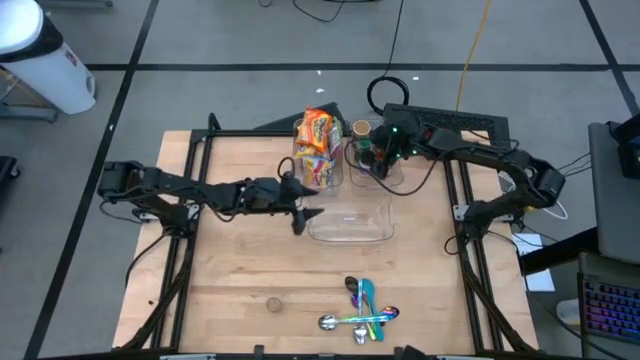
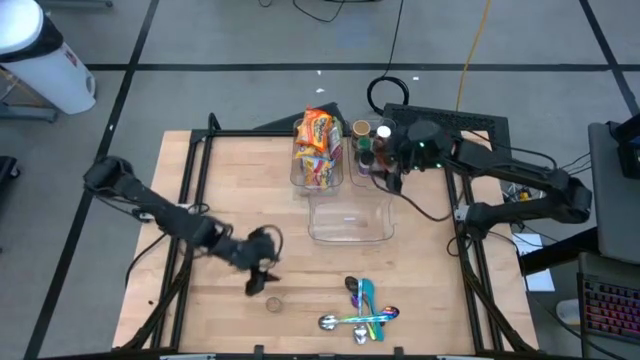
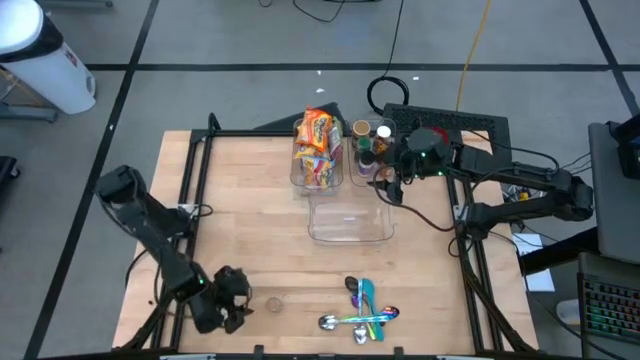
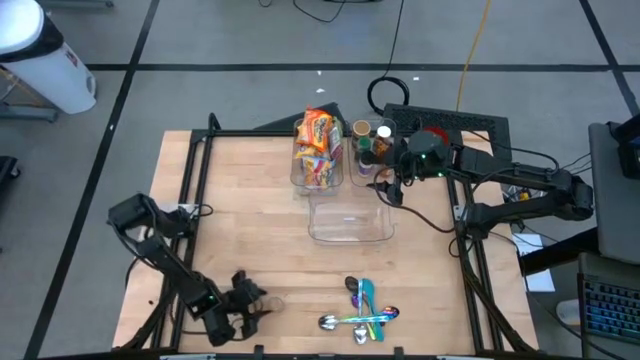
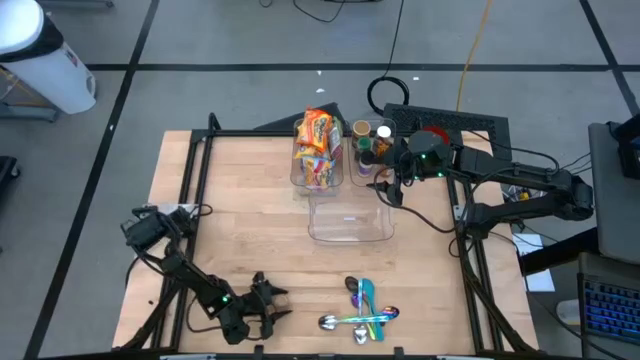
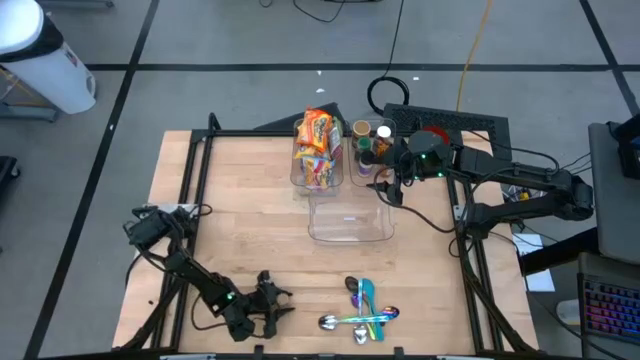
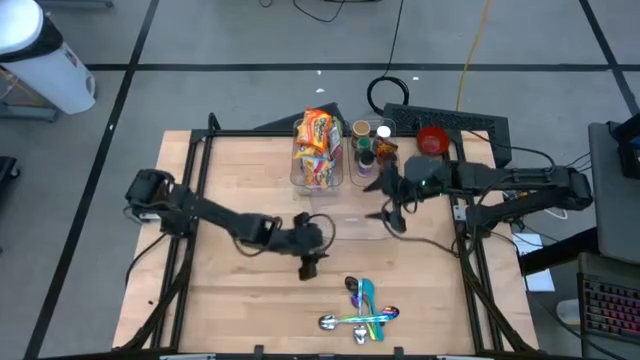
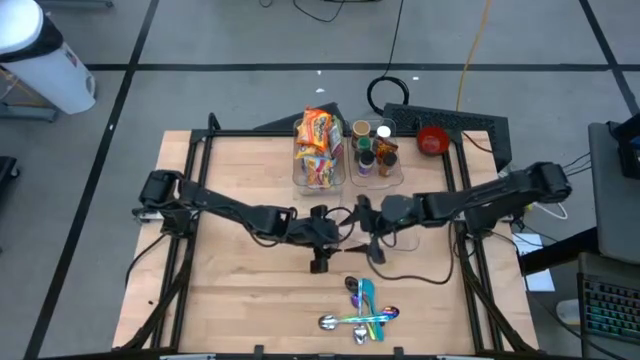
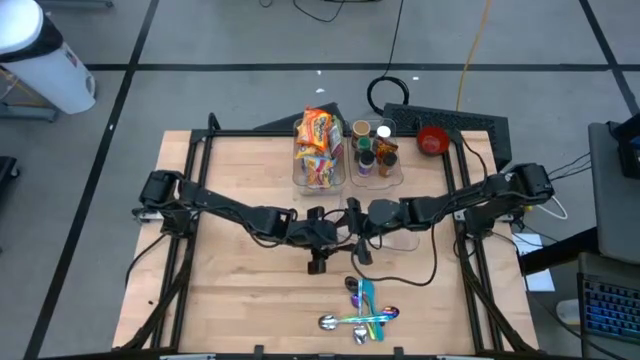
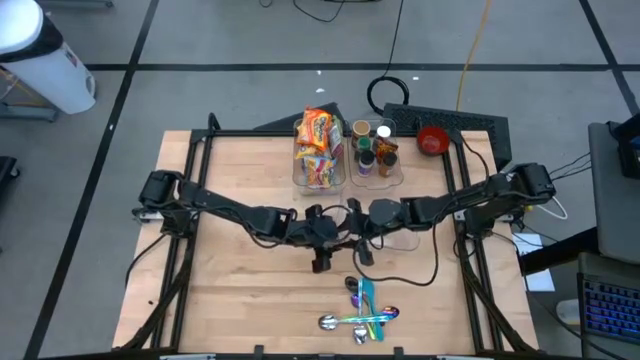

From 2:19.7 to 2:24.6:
Task: Pick & Place Food Item
Put the brown seasoning bottle into the right transparent bin

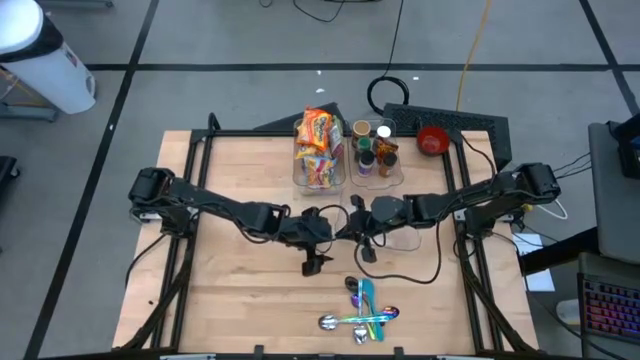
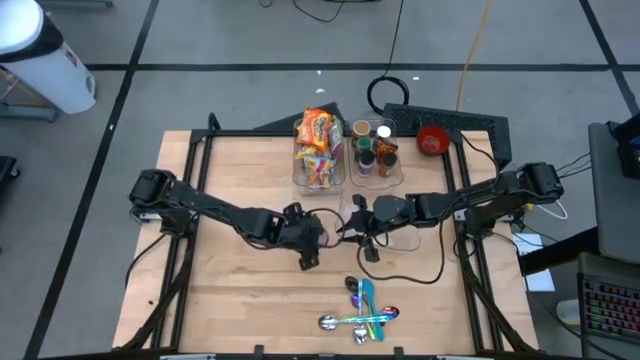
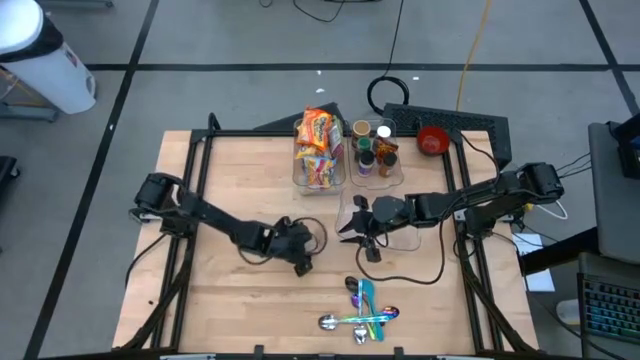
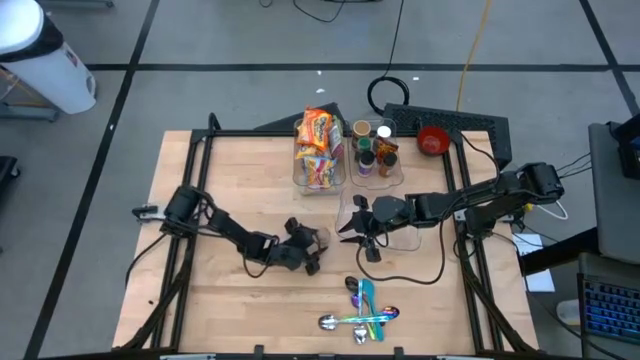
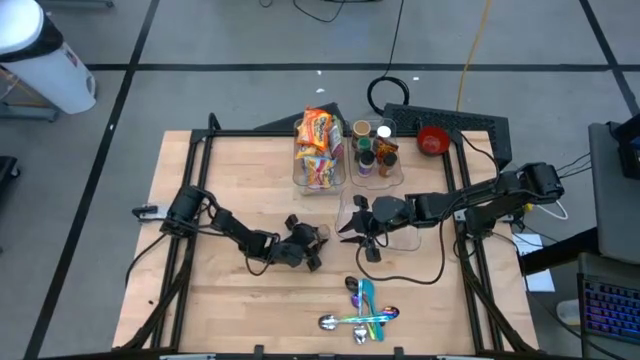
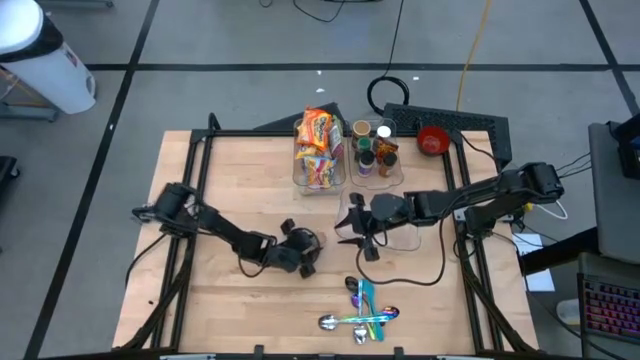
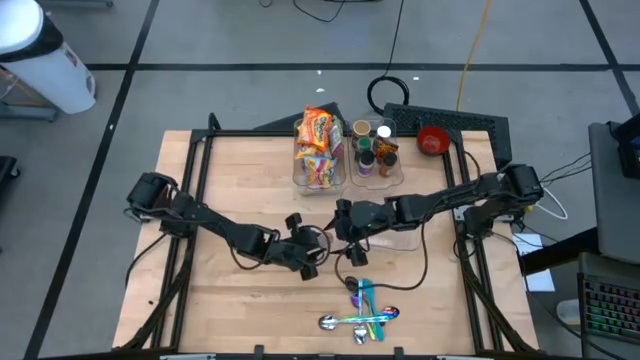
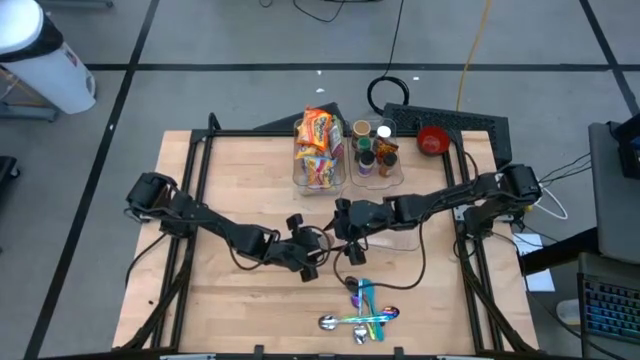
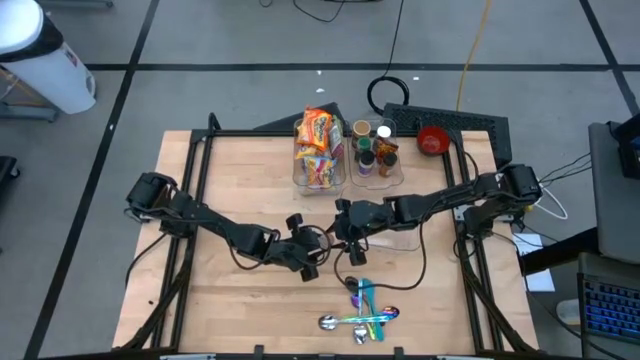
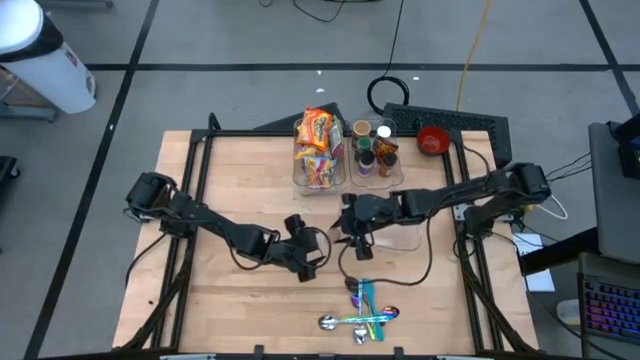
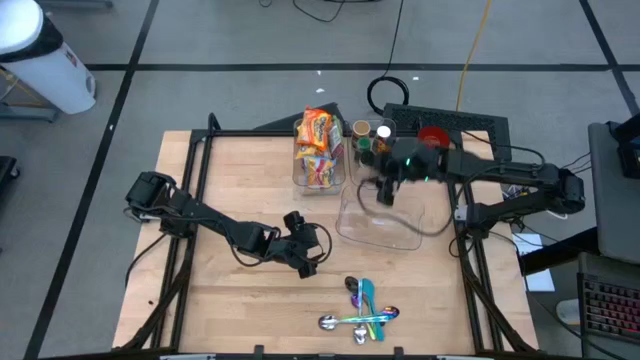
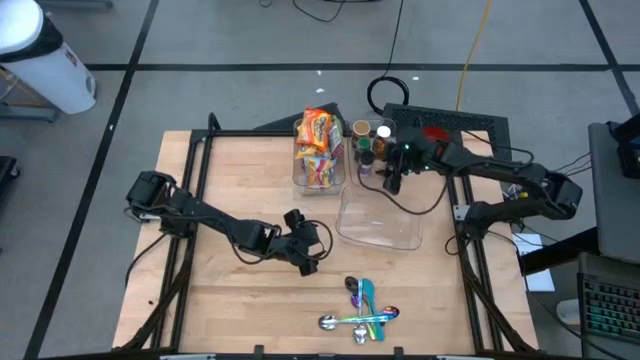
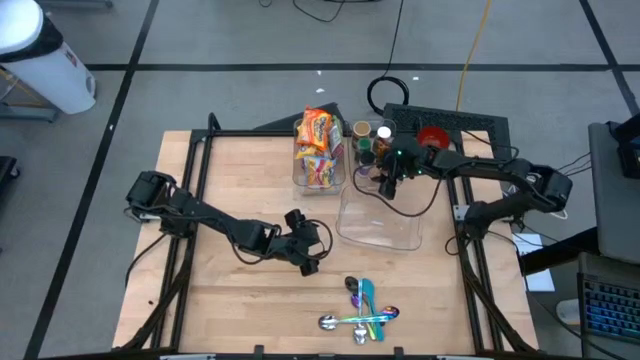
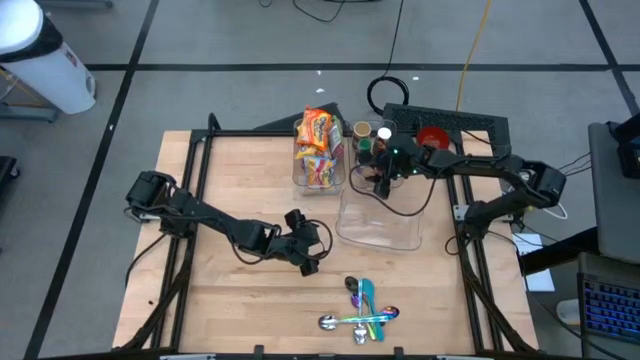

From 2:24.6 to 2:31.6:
Put the brown seasoning bottle into the right transparent bin

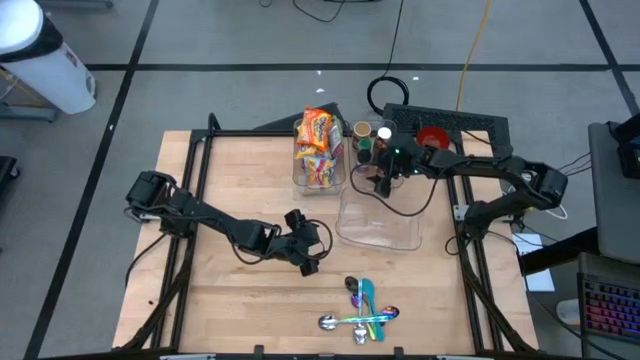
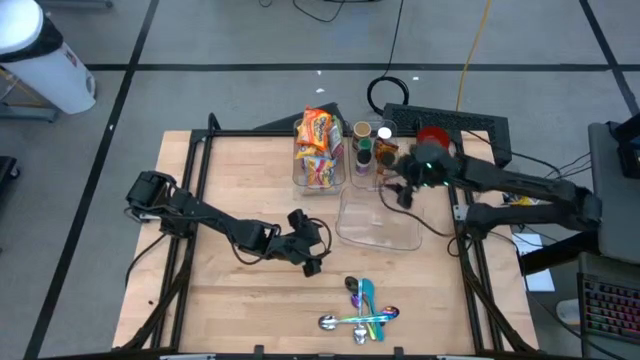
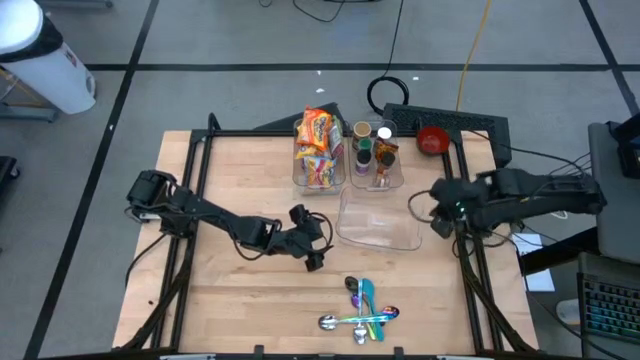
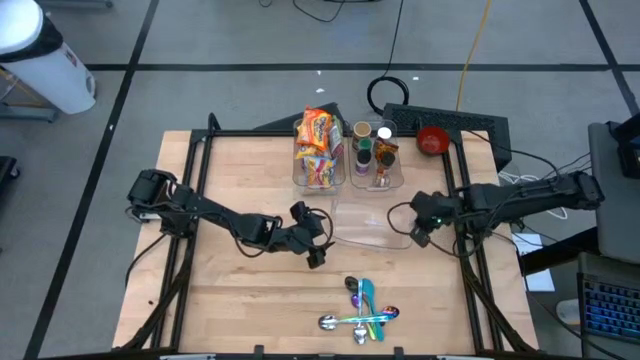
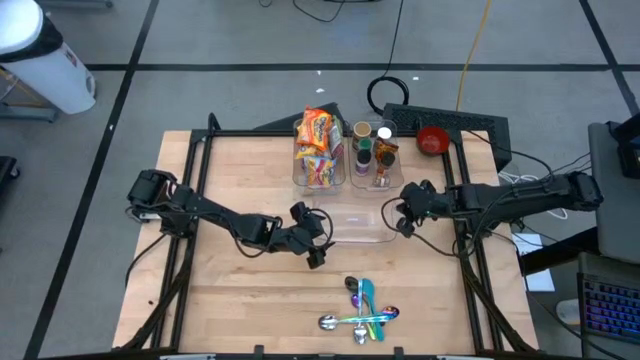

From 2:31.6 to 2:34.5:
Adjust the bottom transparent bin

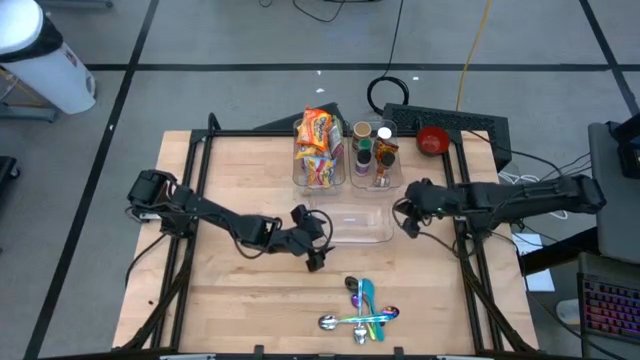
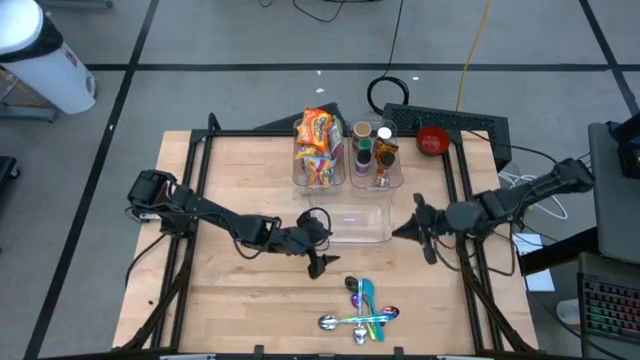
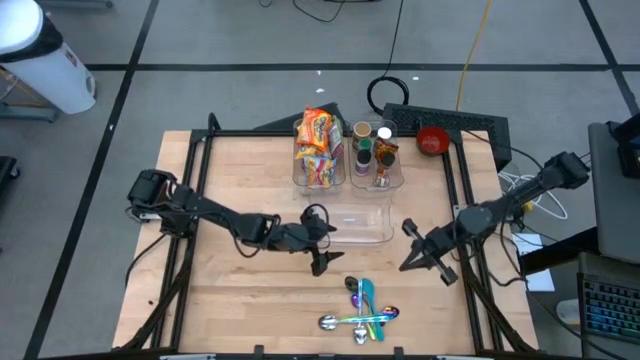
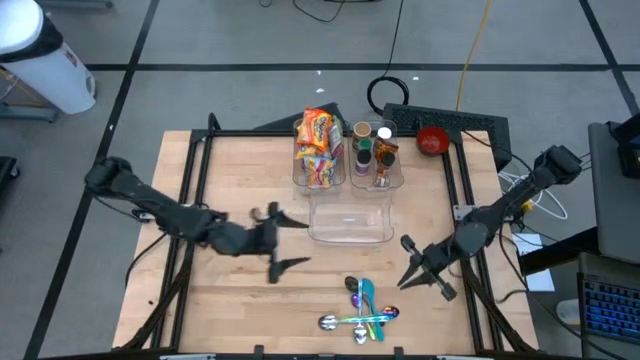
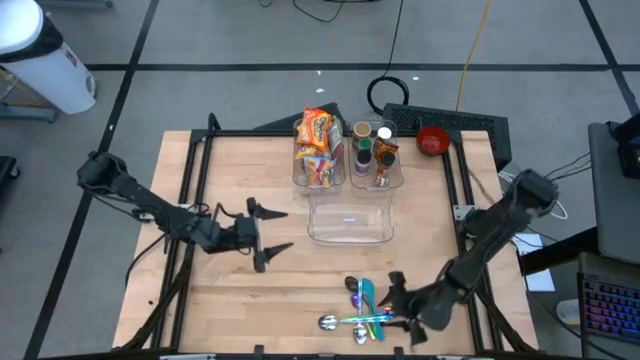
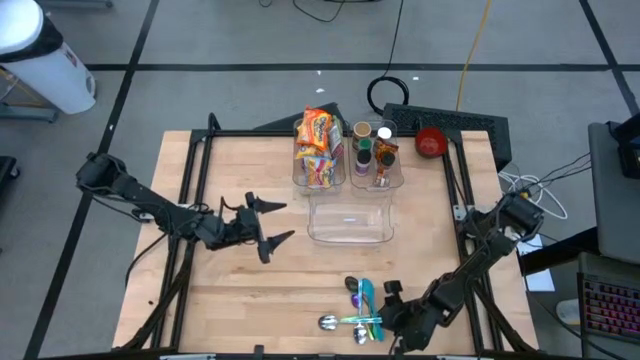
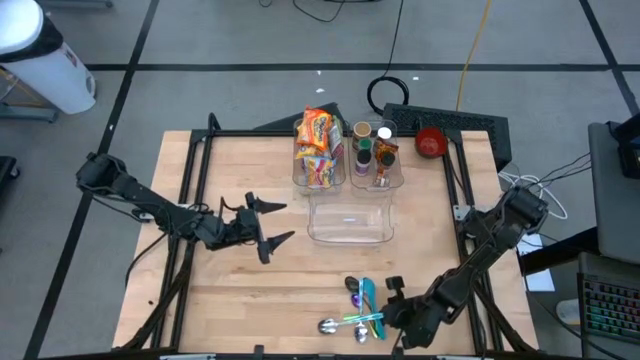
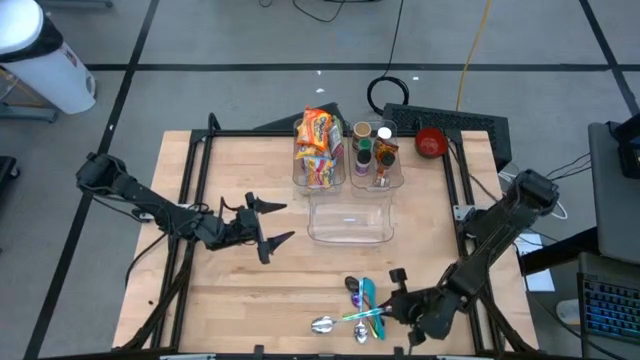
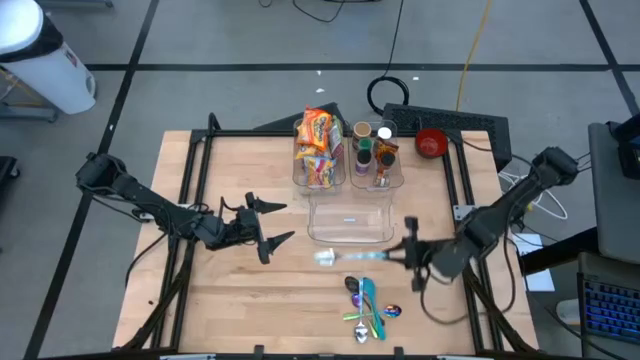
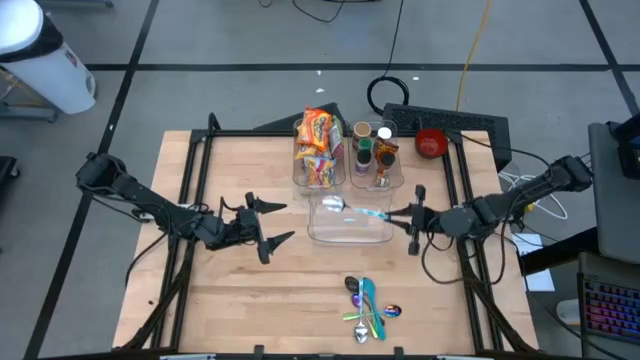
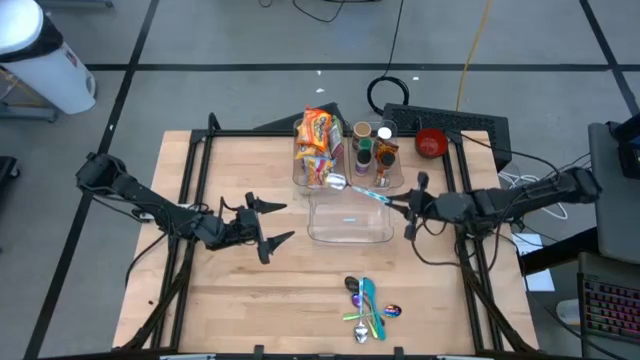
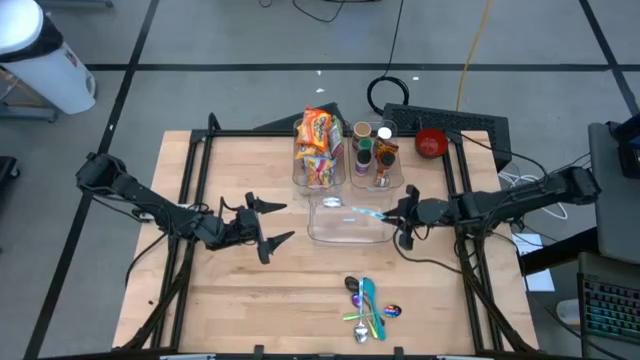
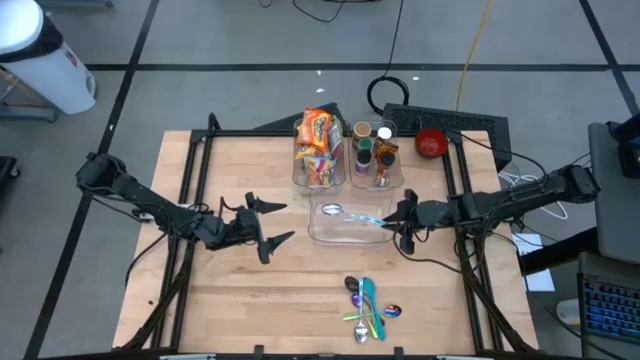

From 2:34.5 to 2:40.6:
Put the top blue white patterned spoon into the bottom transparent bin

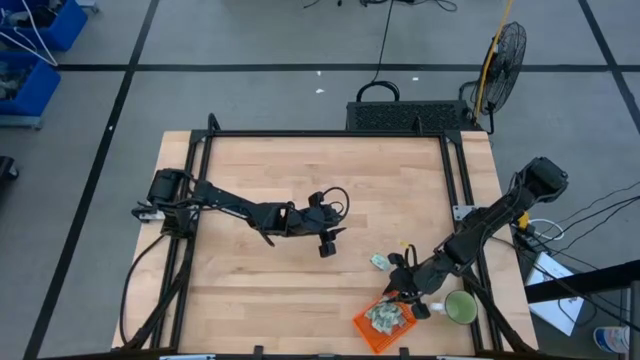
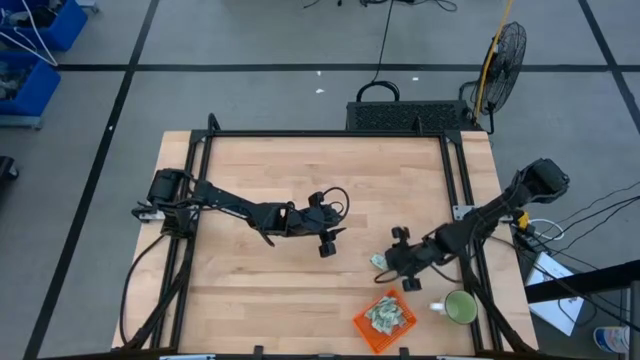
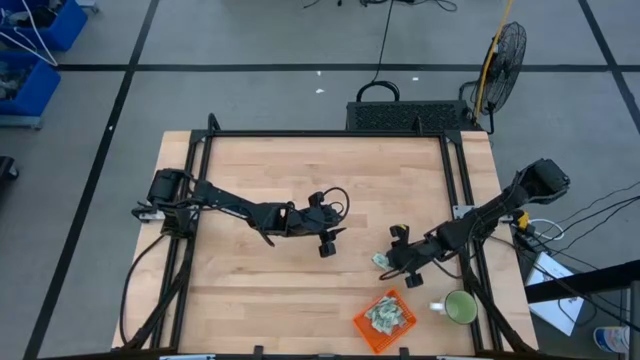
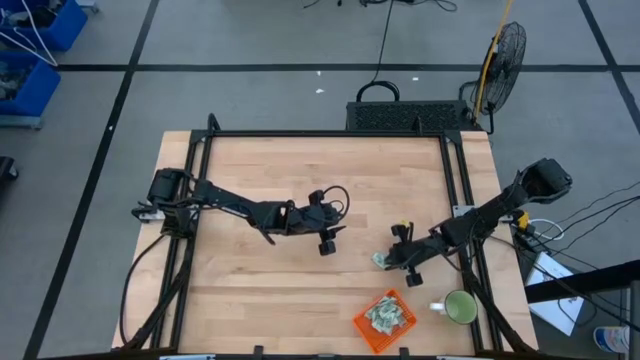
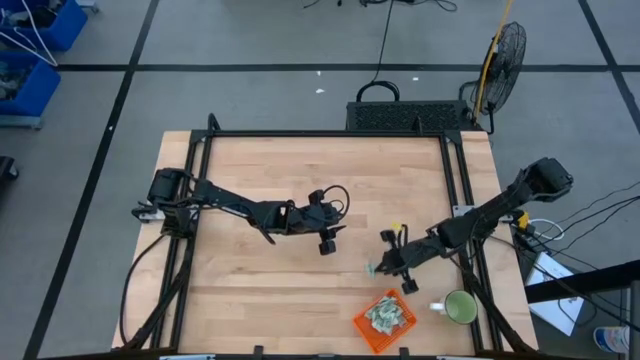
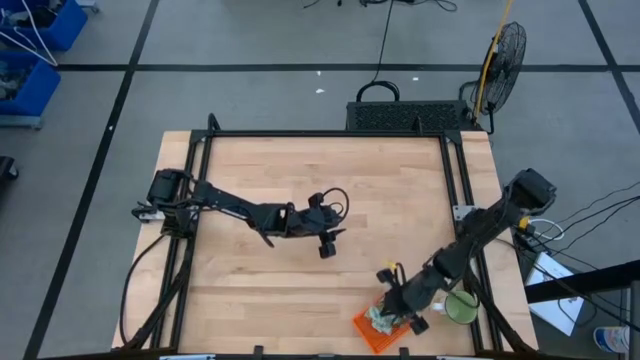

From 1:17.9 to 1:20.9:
Task: Pick and place Stevia / Truvia into bins
Put the stevia packet into the orange bin
